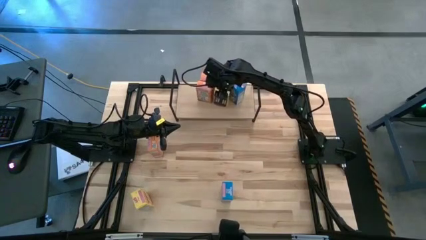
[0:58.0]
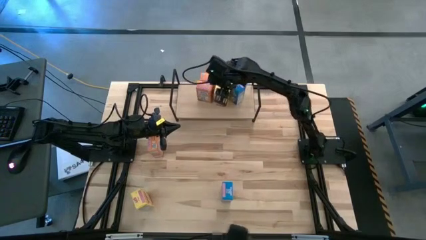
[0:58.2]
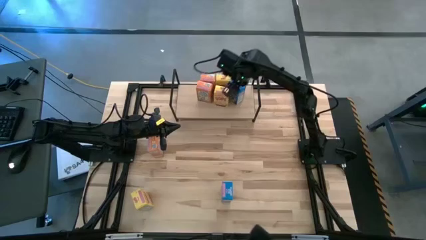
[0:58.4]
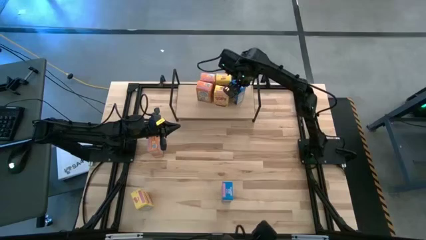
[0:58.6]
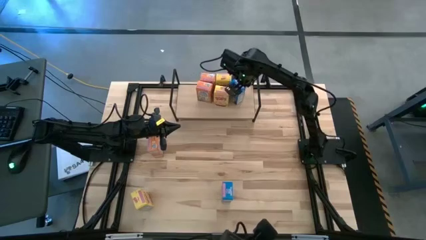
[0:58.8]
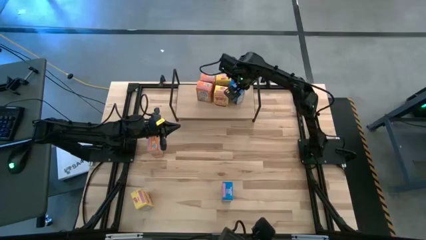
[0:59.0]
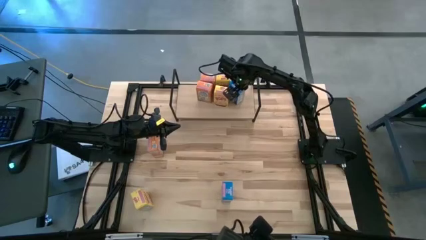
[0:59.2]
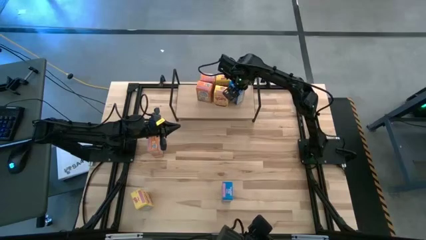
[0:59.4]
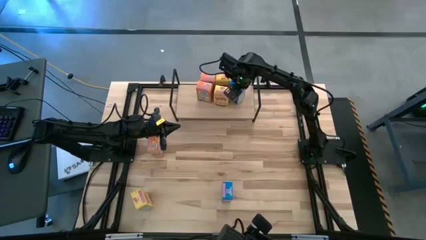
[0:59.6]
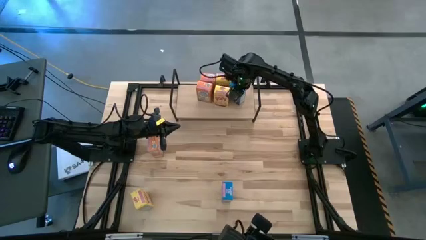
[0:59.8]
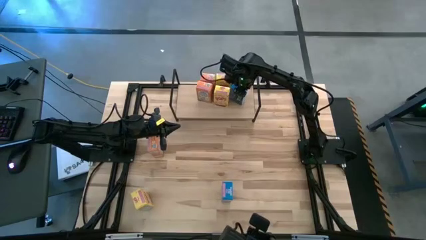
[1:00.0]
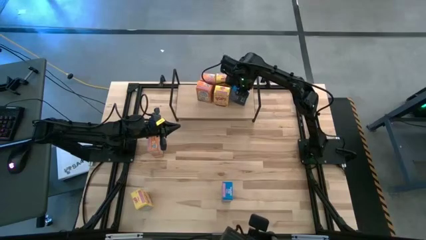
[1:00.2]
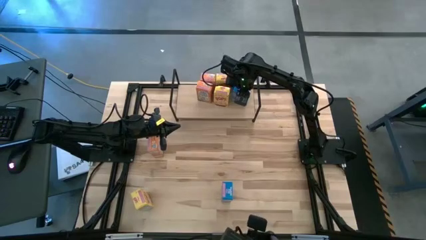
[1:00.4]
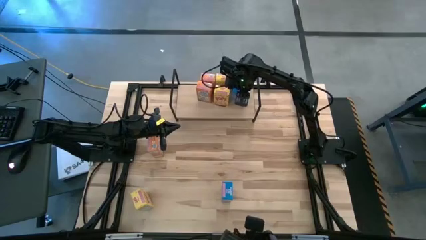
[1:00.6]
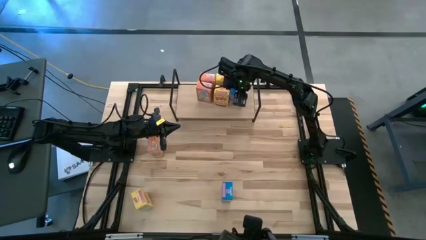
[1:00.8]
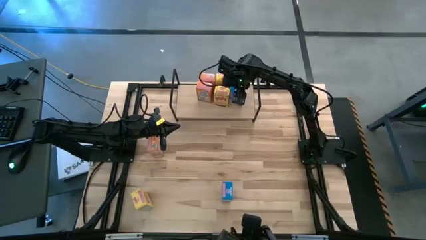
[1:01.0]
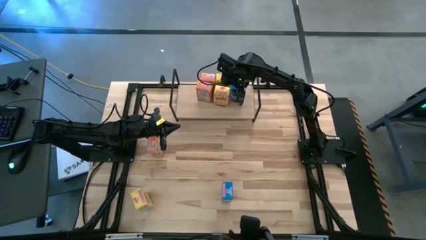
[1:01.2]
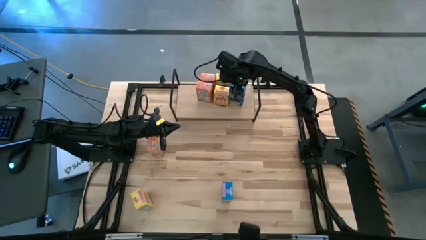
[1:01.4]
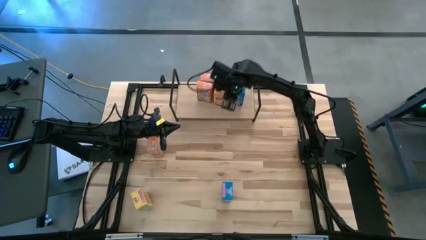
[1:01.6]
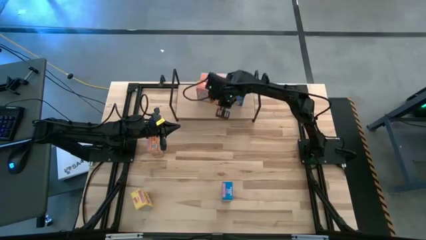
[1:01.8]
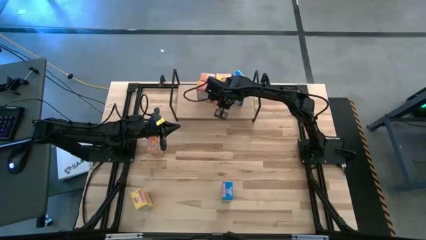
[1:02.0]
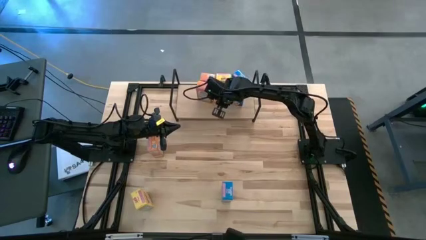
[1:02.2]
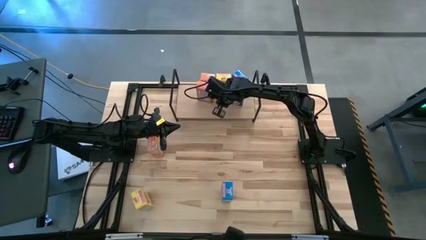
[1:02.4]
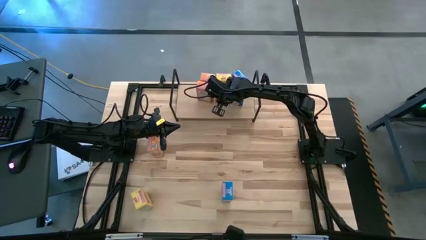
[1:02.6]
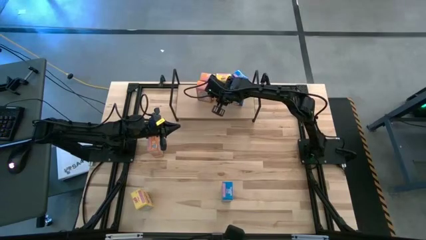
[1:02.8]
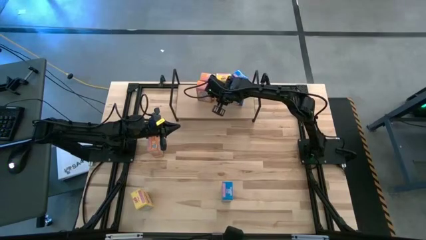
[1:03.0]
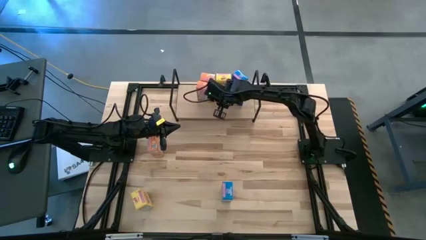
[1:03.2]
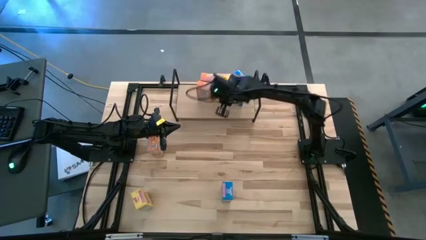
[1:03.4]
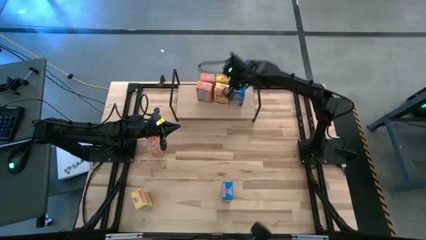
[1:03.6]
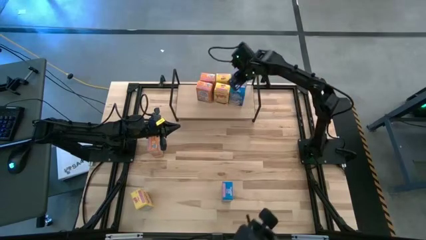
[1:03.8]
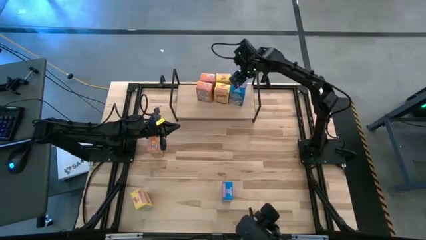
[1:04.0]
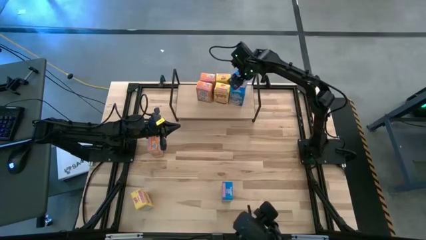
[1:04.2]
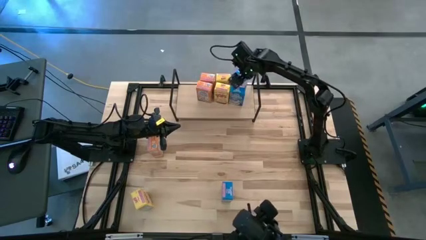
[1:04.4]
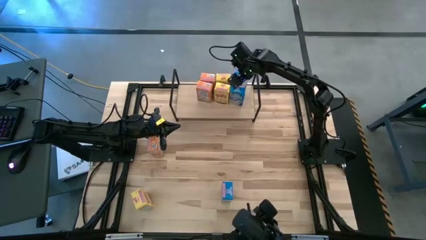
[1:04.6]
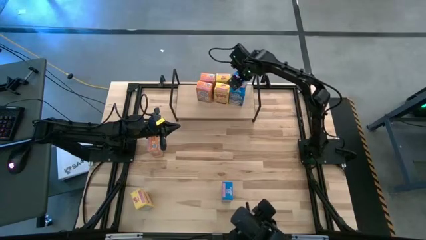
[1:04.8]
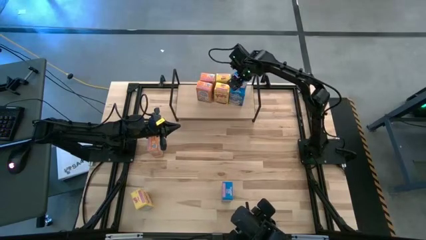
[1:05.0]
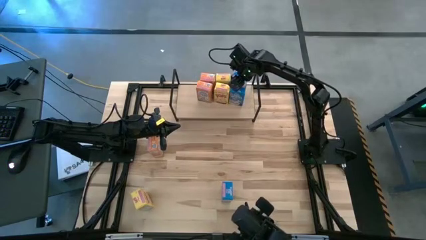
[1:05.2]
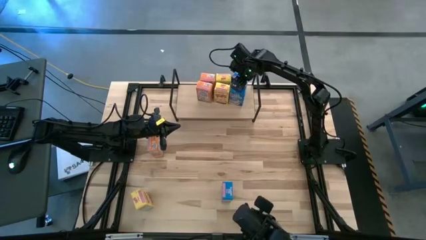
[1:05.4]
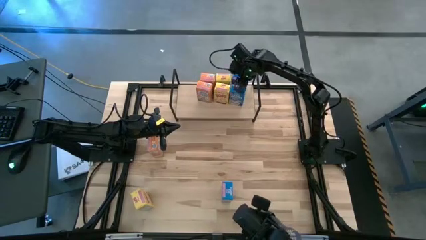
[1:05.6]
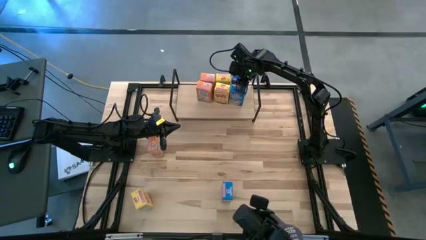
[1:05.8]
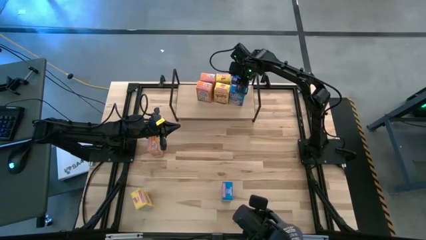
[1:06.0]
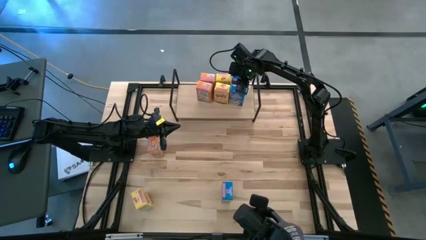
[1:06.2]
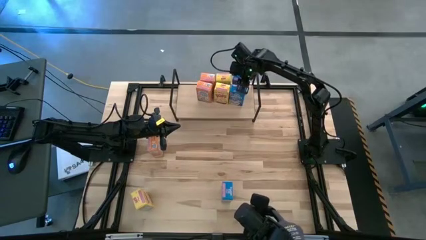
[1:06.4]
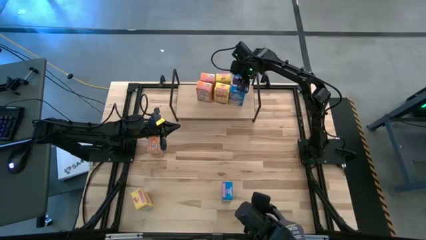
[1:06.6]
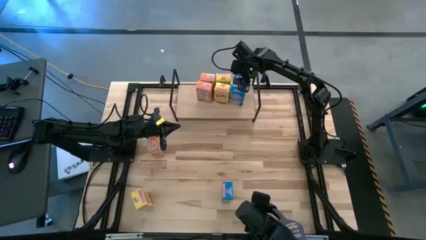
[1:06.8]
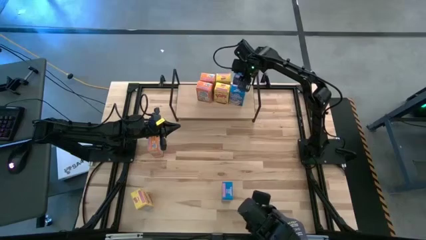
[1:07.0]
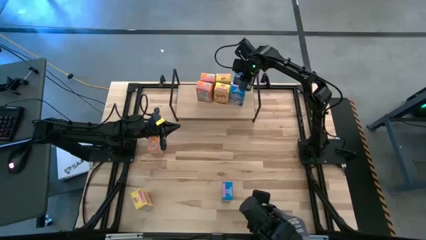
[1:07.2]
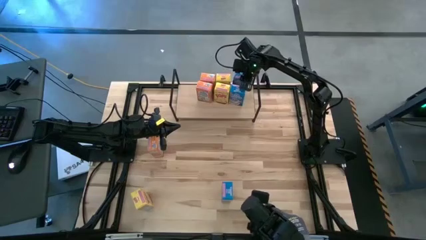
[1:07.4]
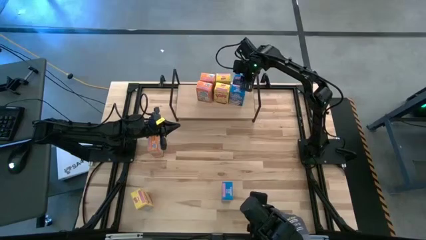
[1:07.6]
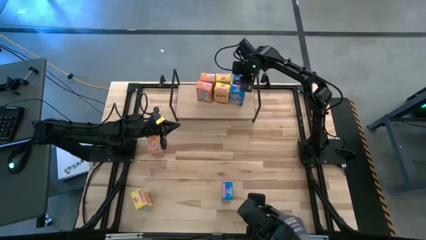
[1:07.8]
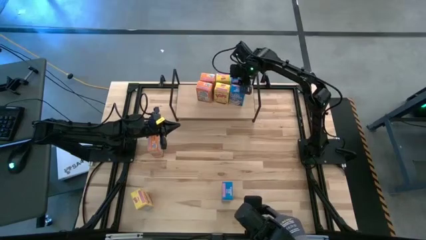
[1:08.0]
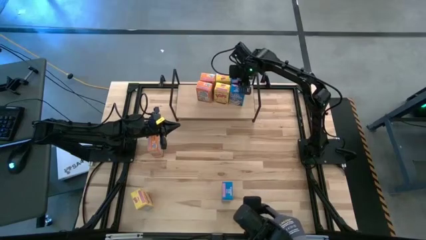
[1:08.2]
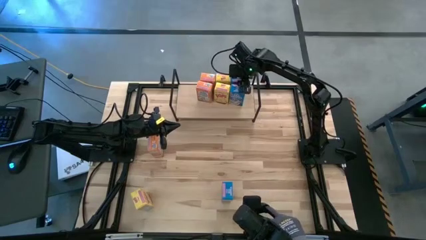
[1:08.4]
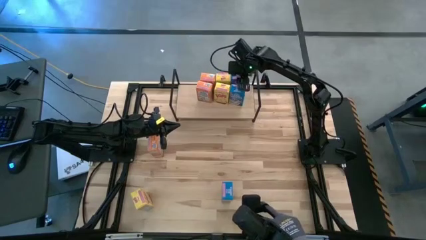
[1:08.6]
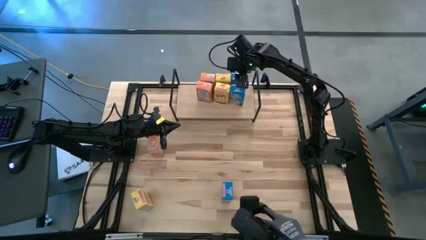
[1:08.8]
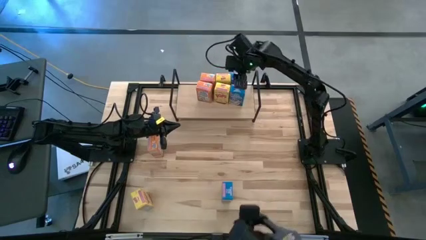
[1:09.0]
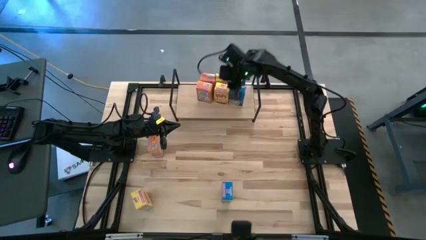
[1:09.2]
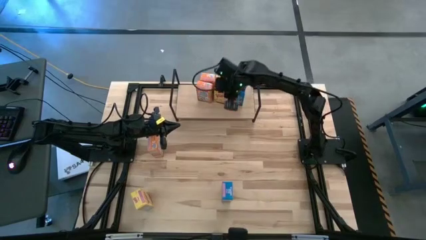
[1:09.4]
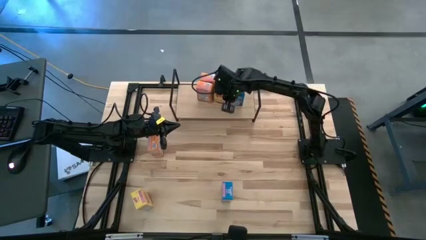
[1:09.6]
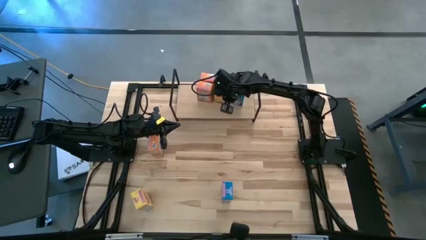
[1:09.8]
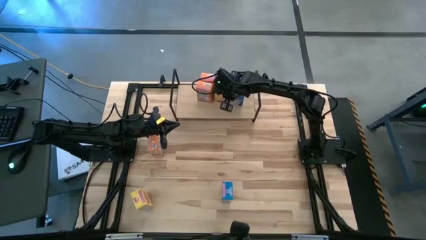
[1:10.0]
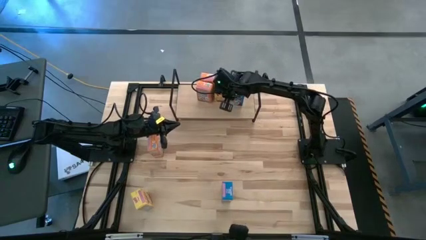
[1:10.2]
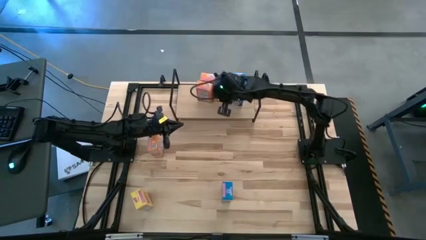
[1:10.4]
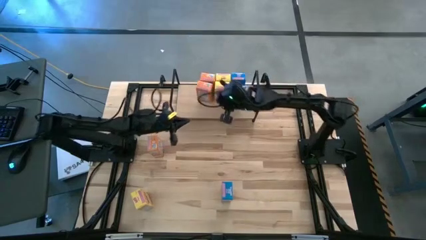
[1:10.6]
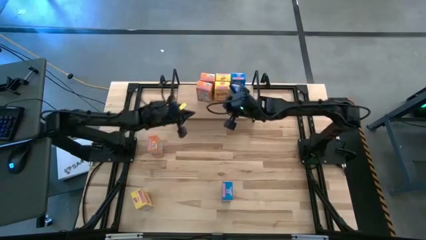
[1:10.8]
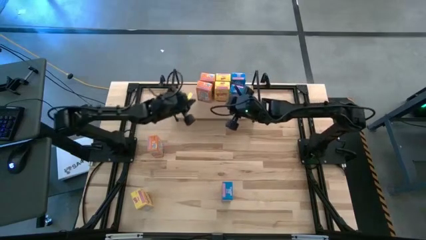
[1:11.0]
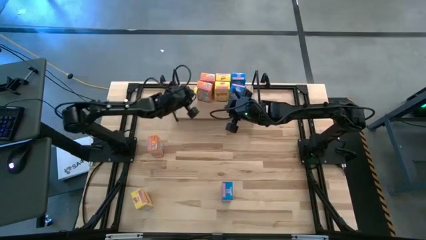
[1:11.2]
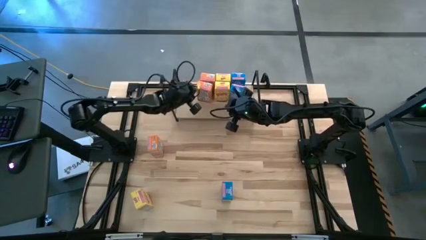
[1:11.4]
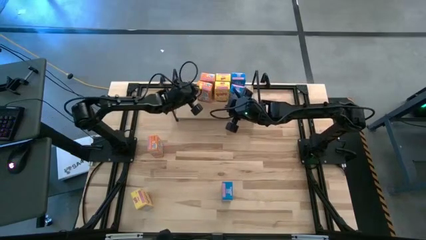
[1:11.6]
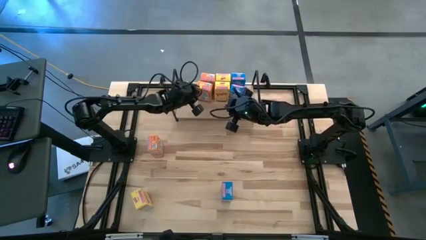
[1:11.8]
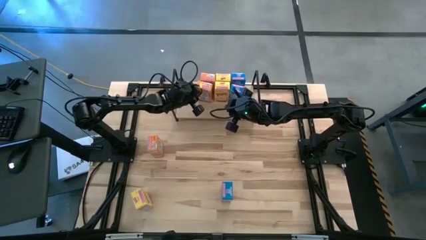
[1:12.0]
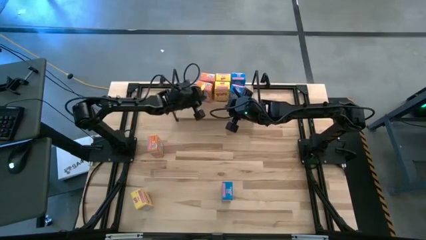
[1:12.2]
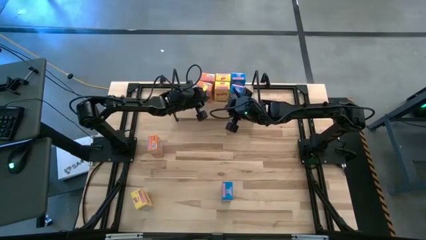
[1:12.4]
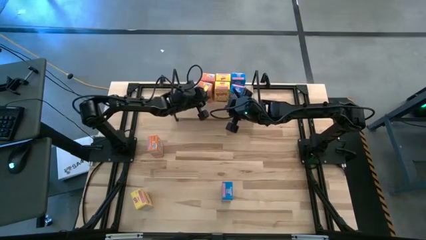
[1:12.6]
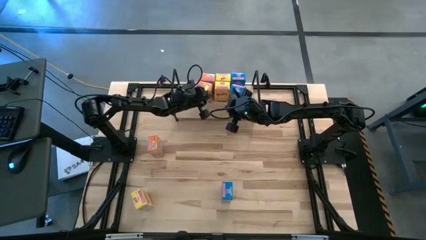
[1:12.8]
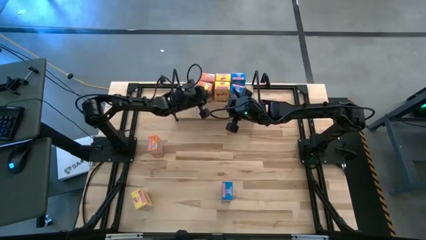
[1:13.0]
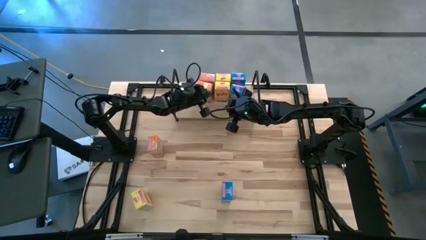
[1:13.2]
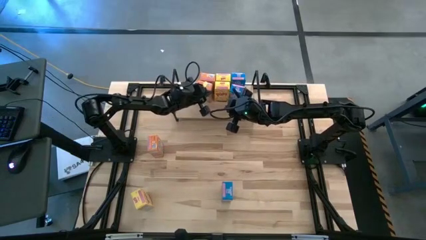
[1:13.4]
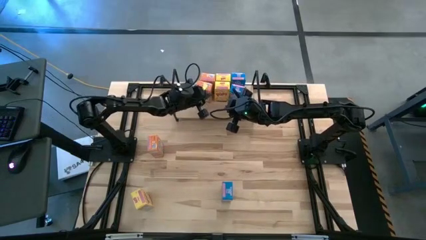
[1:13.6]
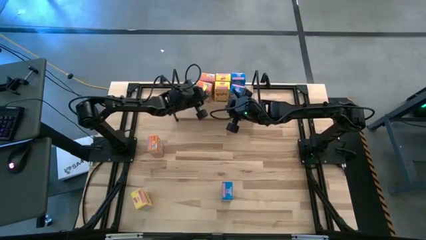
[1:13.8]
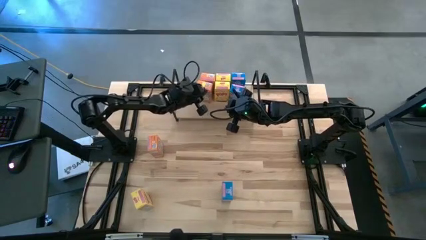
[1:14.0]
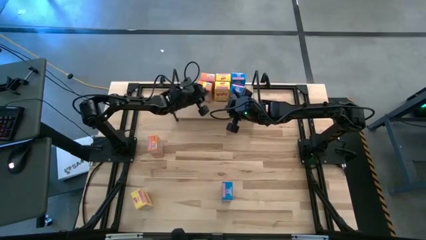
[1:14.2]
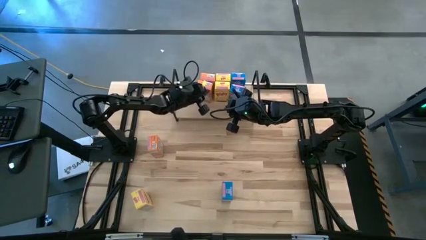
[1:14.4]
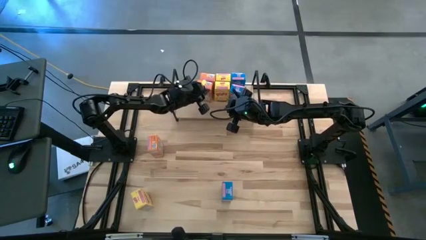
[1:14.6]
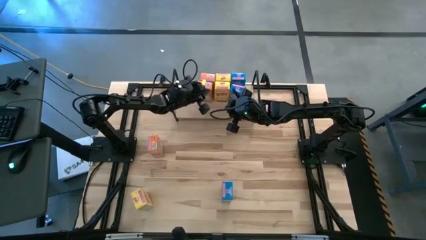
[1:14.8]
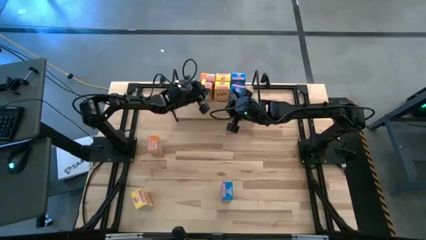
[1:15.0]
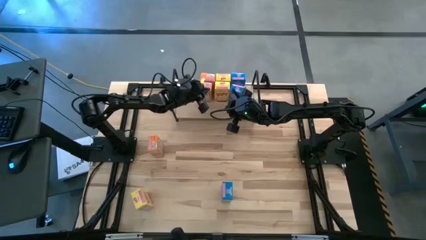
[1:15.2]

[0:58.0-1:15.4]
Task: Stack cereal on shelf
Adjust the cereal boxes on the shelf
